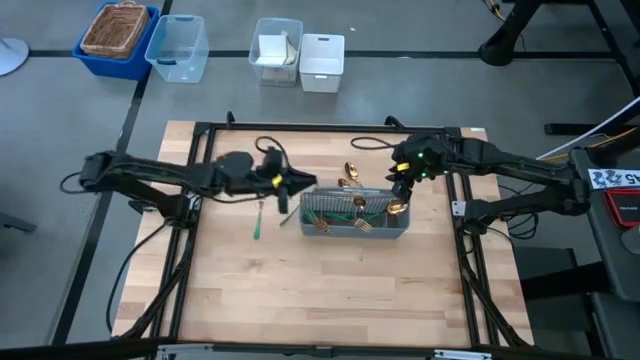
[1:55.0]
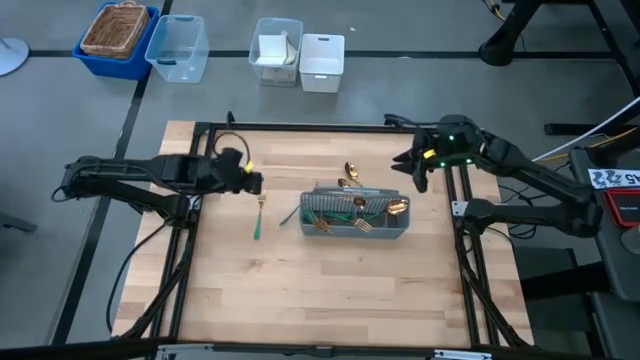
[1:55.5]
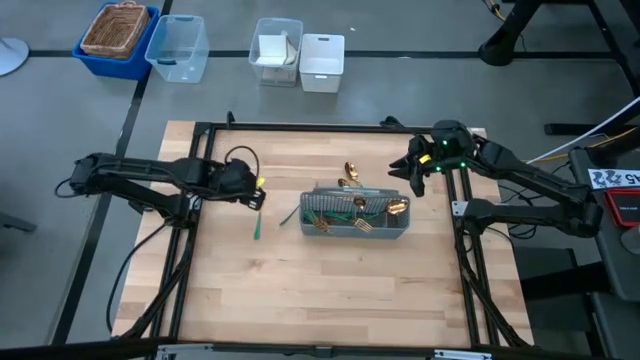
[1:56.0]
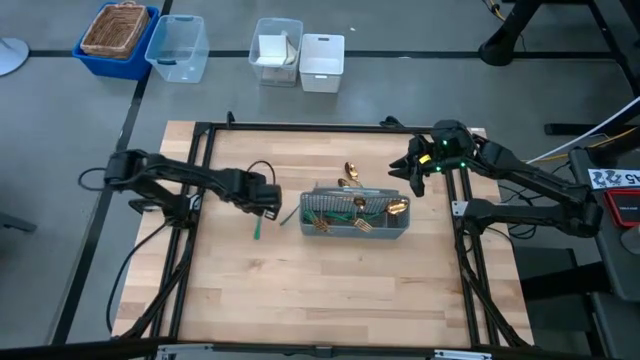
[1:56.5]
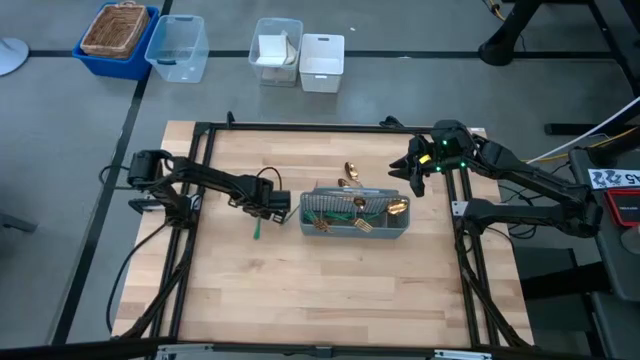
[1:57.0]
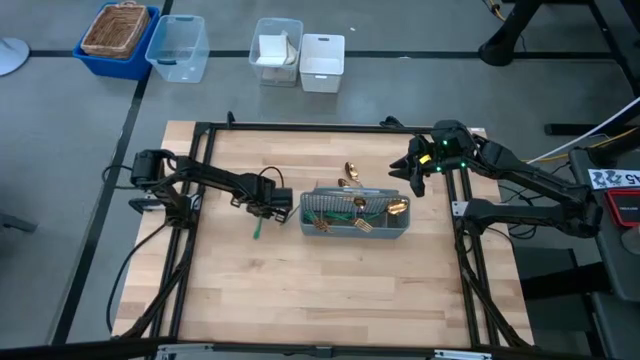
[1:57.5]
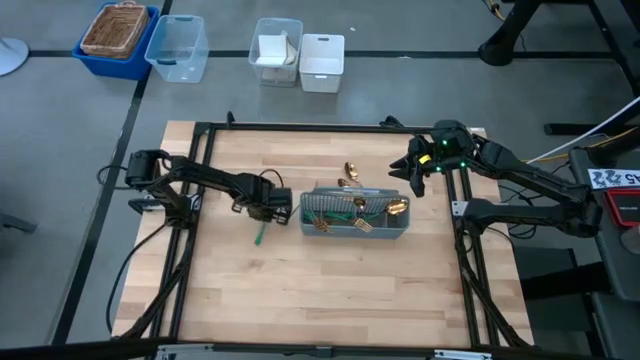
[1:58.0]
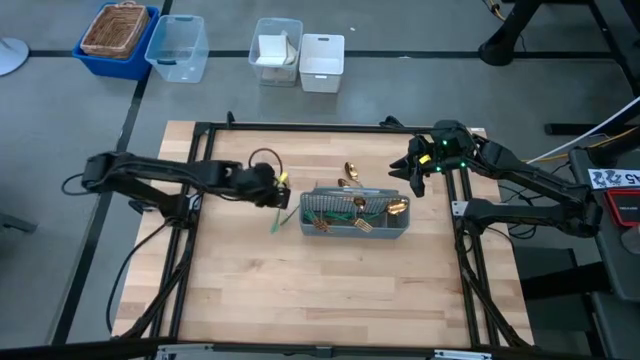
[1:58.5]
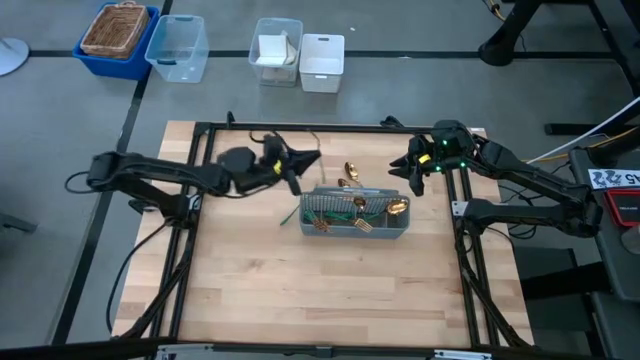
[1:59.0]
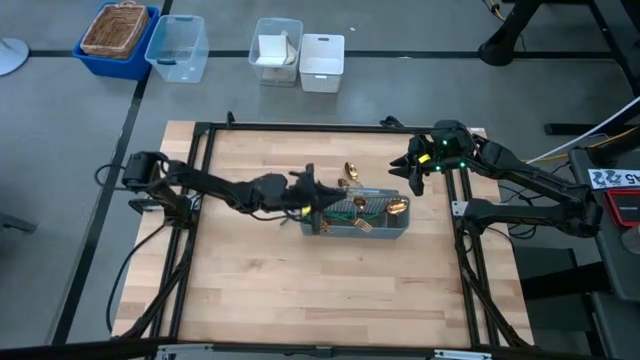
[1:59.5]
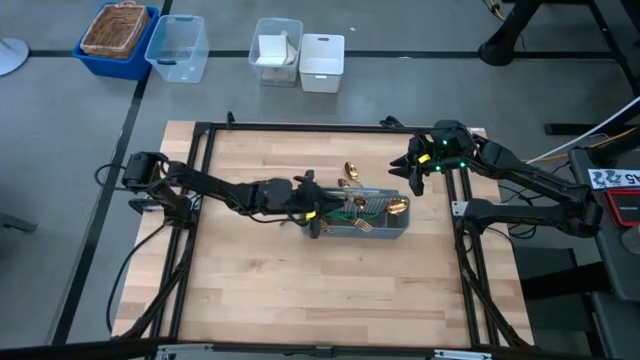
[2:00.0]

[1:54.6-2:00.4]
Task: Sort silverware
Put the green fork into the gray utensil holder

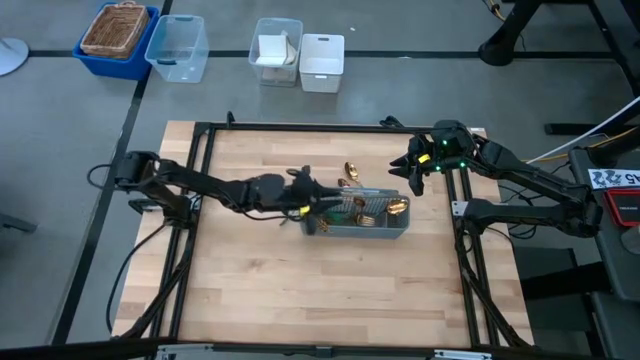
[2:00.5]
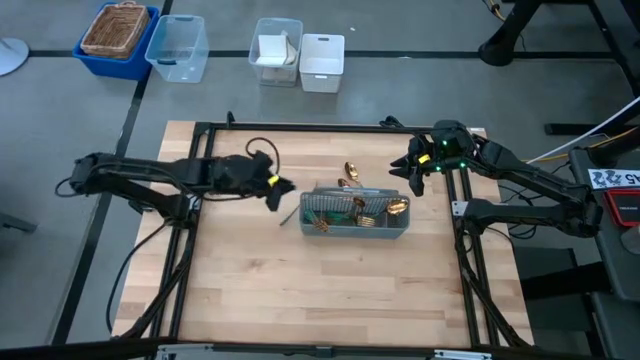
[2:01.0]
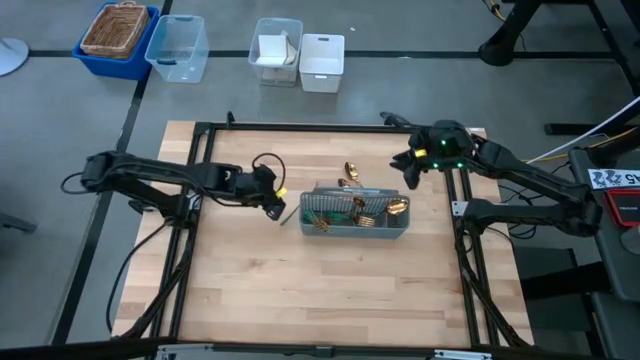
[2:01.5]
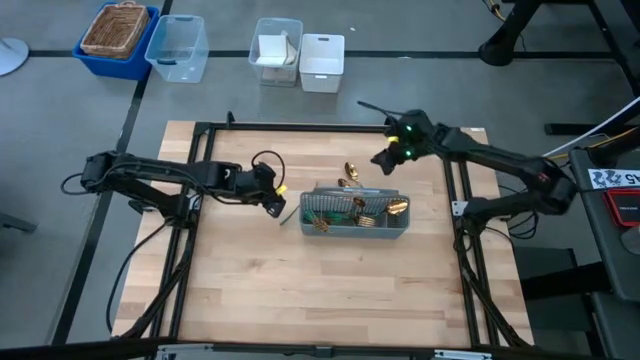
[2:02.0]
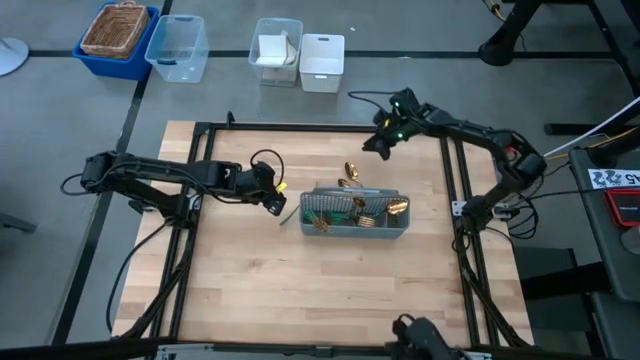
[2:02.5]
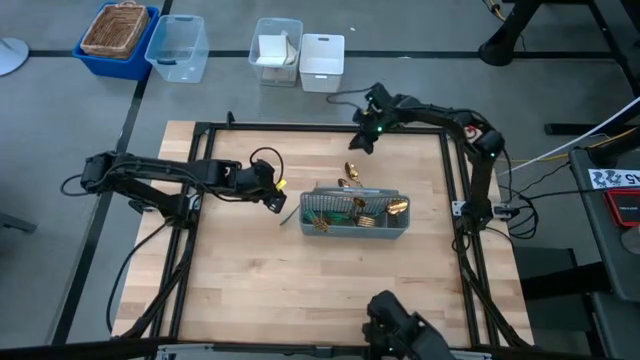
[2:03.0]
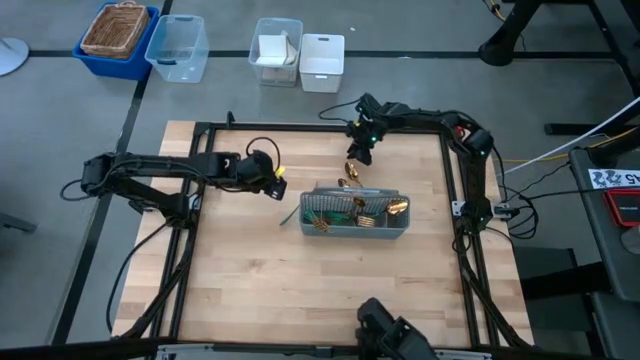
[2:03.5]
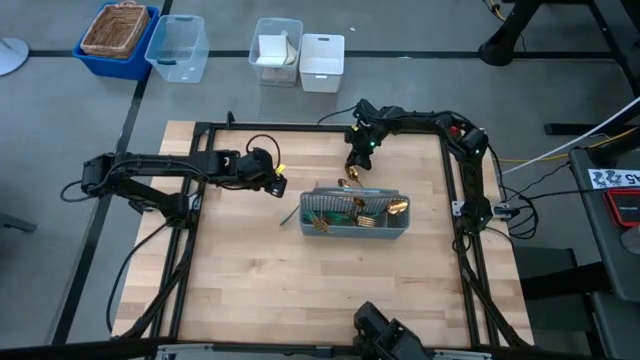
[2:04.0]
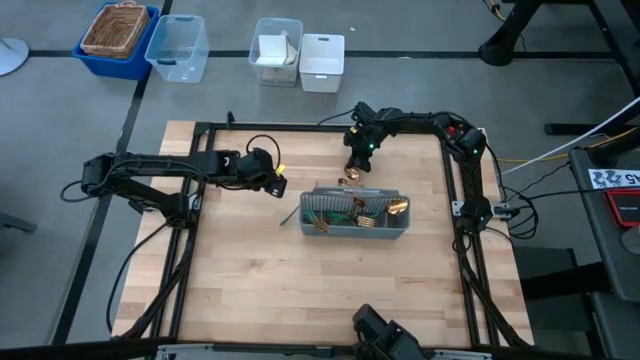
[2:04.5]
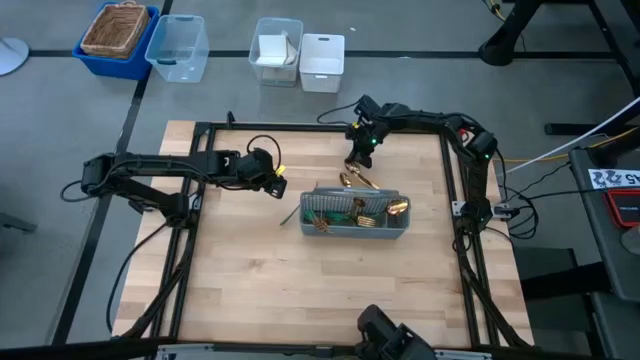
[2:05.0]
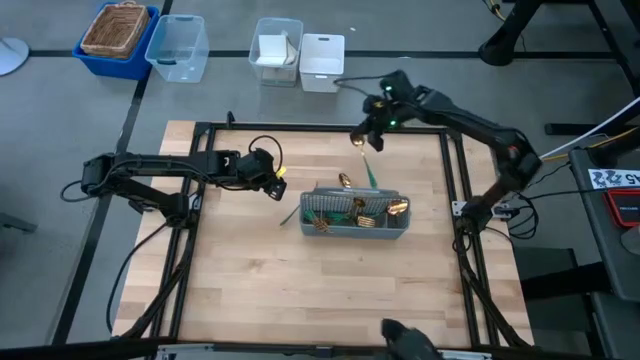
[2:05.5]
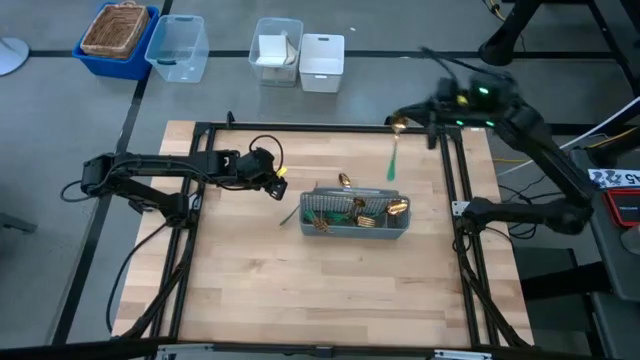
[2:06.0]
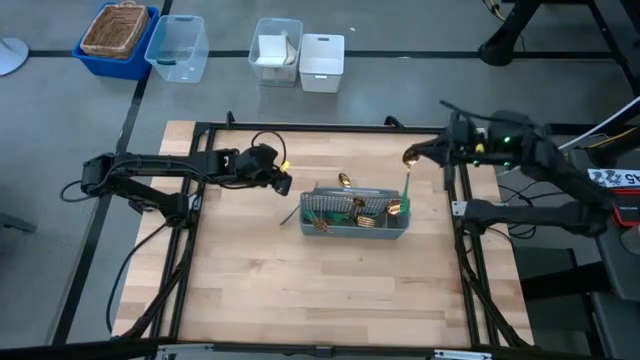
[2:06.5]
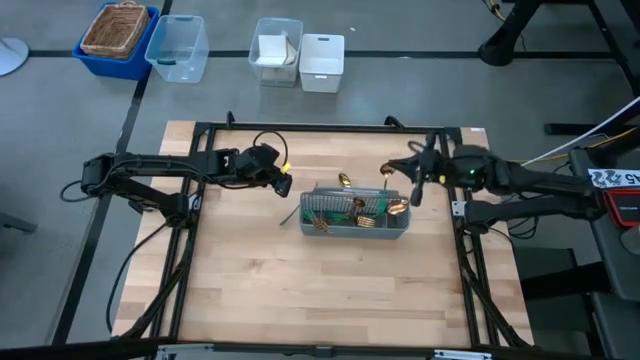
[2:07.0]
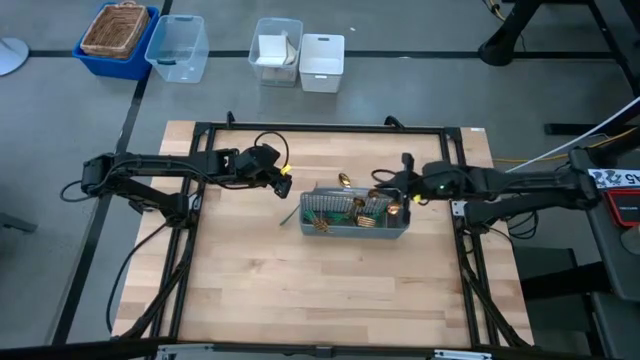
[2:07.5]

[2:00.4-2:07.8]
Put the green spoon into the gray utensil holder

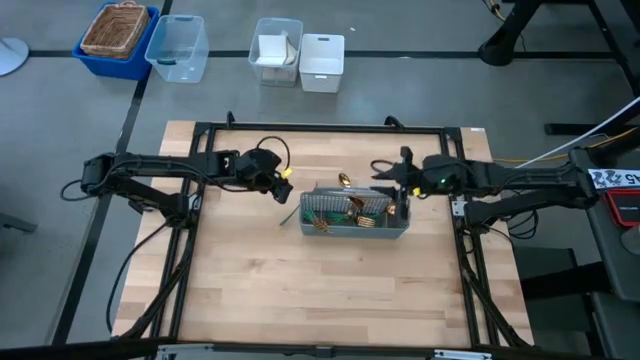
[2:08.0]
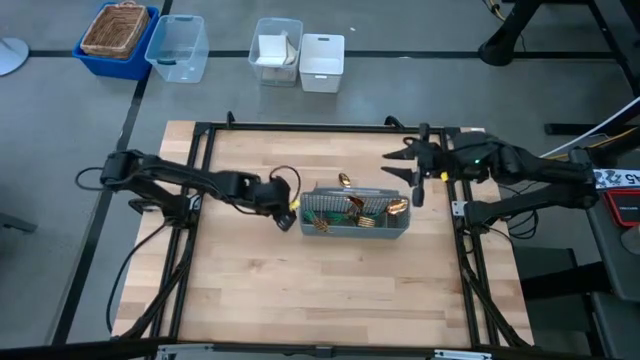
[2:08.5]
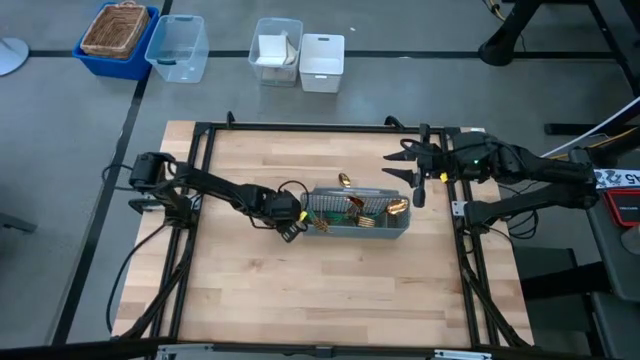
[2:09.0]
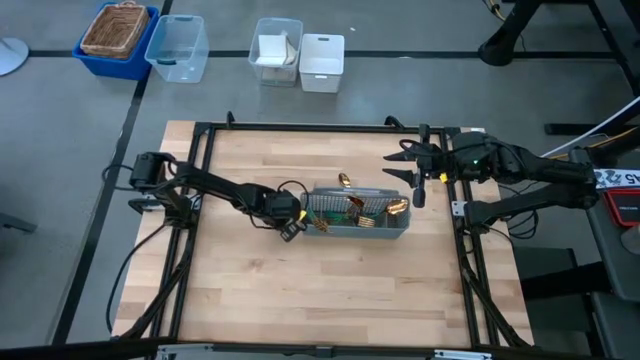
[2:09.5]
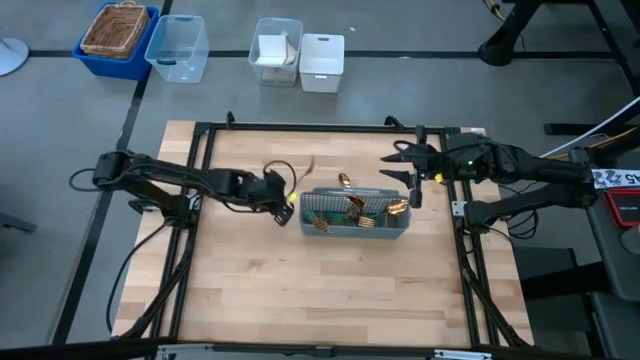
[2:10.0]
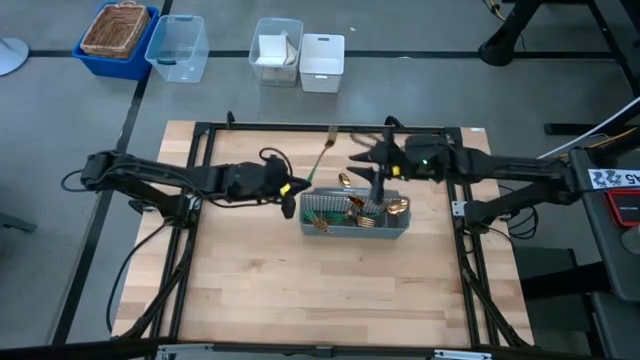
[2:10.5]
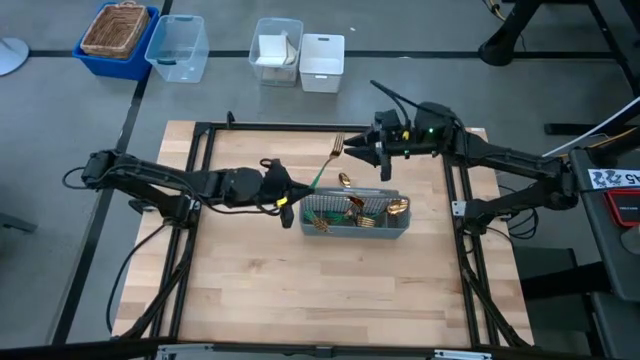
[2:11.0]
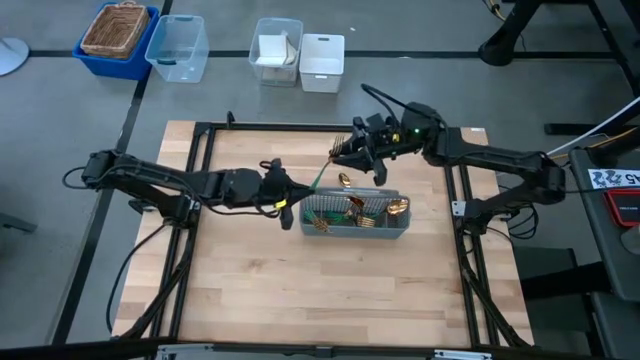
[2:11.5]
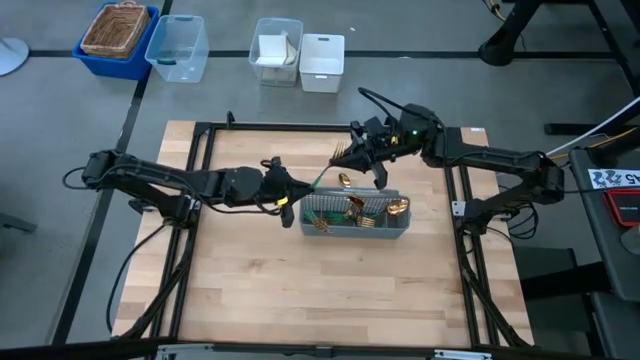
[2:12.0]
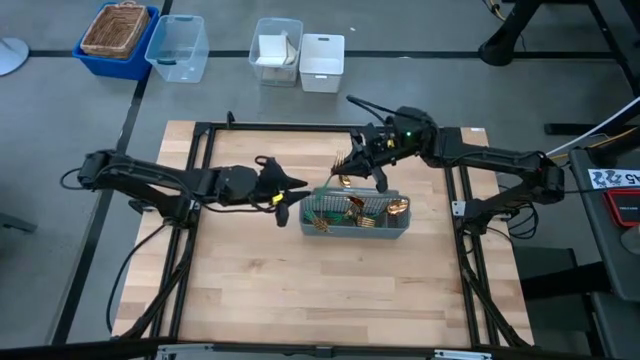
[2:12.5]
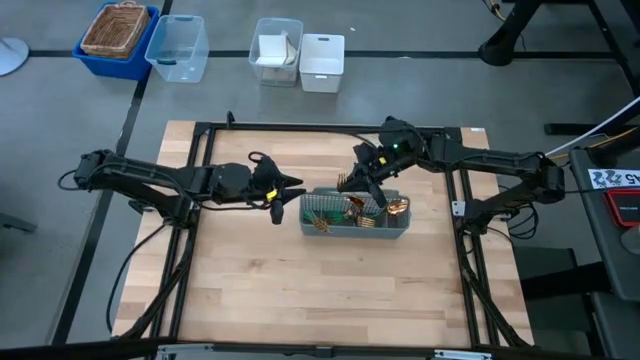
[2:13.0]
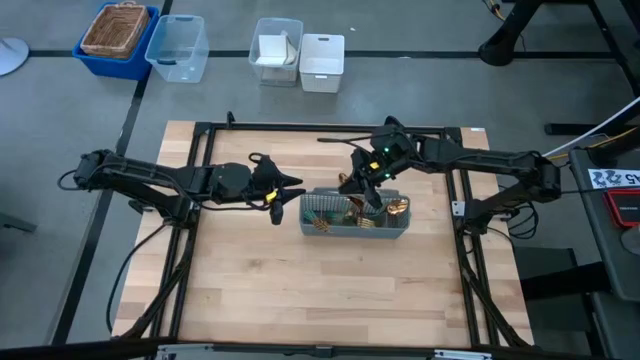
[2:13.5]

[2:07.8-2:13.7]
Put the green fork into the gray utensil holder

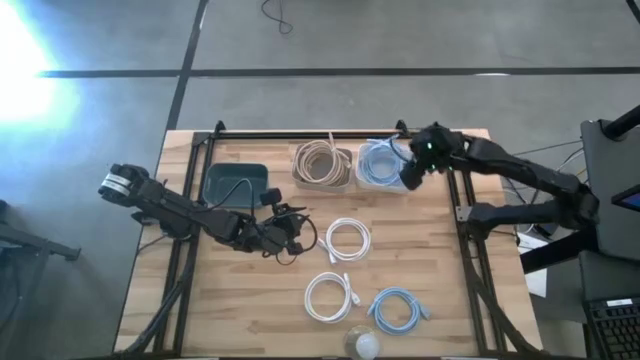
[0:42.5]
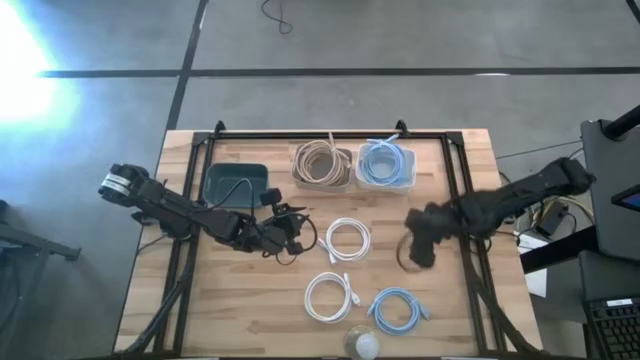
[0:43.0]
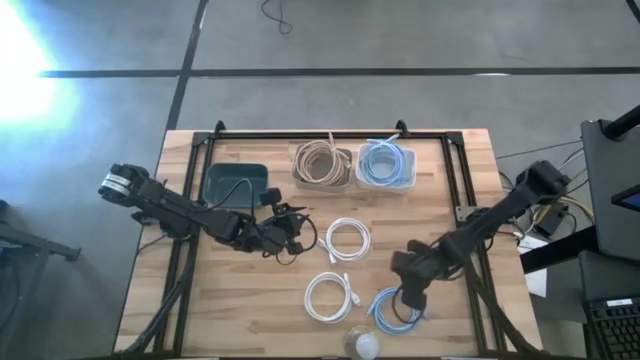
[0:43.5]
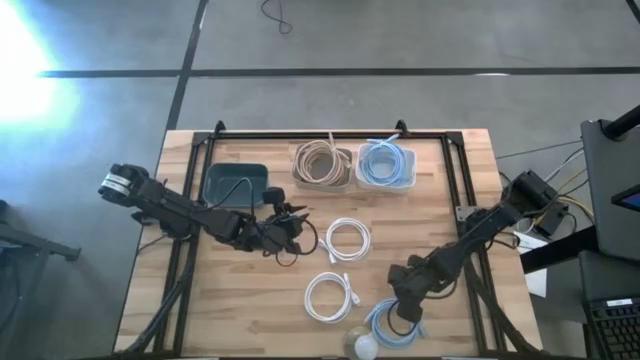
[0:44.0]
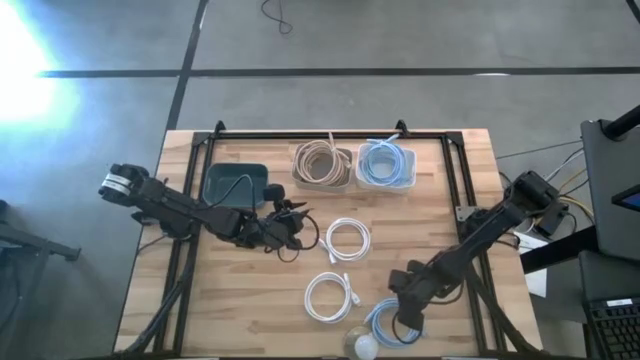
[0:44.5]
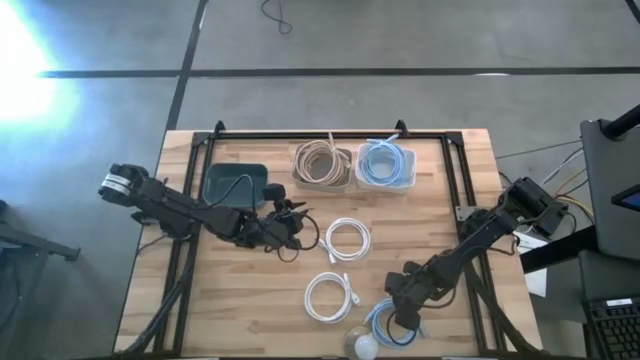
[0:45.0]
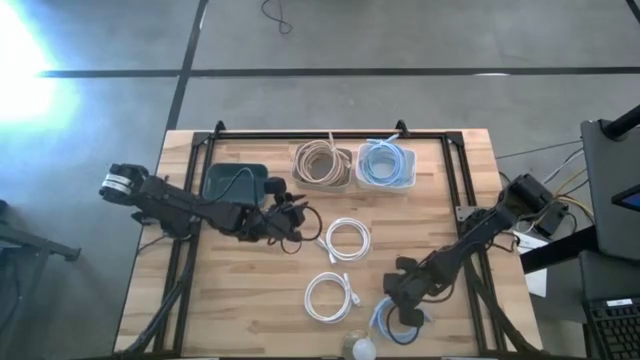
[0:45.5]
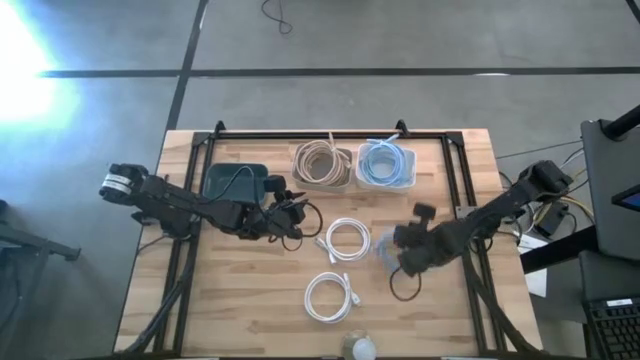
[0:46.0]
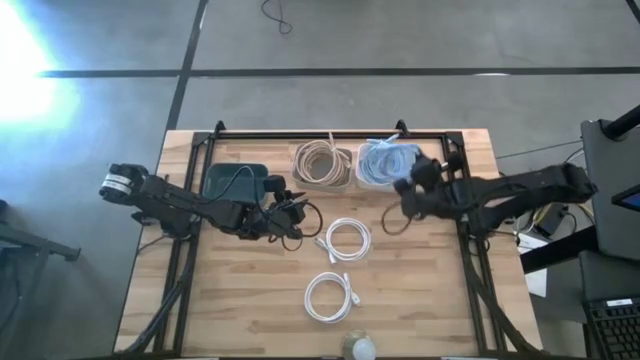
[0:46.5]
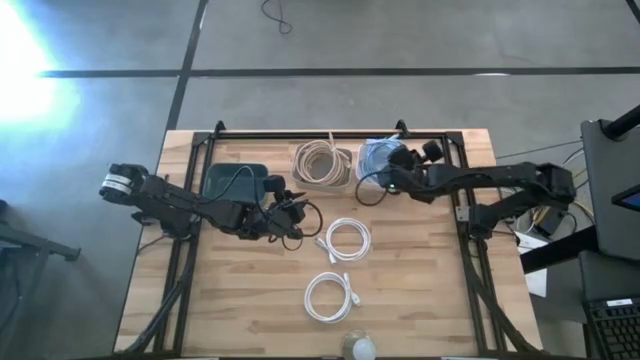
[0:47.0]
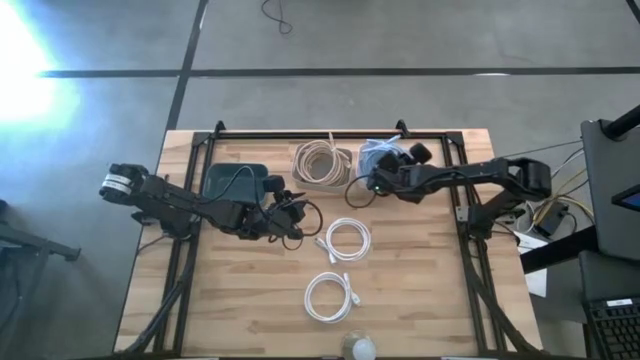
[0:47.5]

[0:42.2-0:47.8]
Task: Pick & Place USB Port
Put the blue USB cable into the white bin
